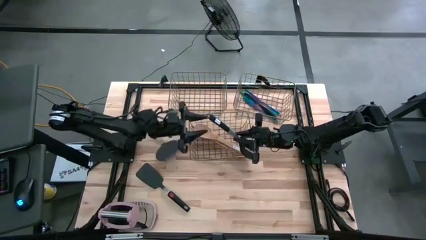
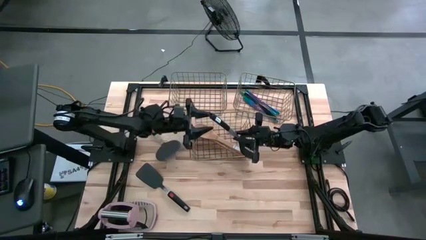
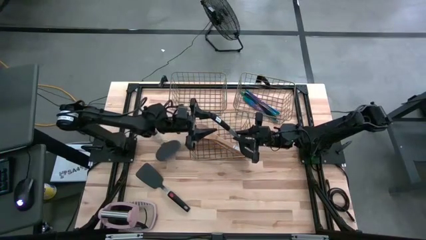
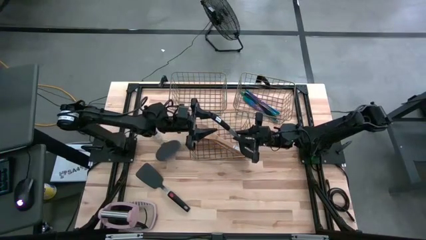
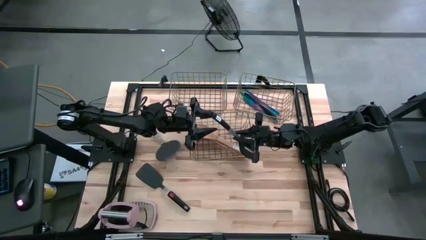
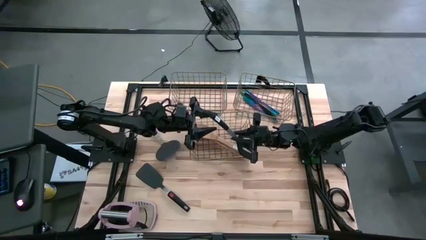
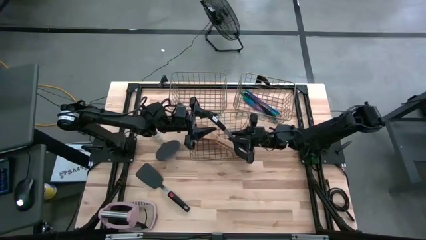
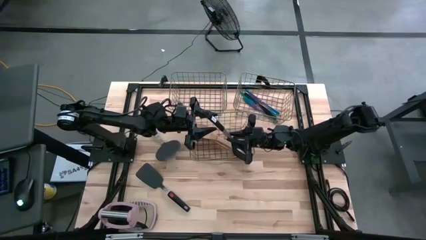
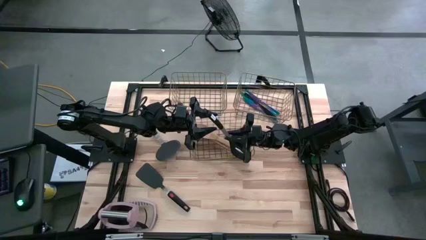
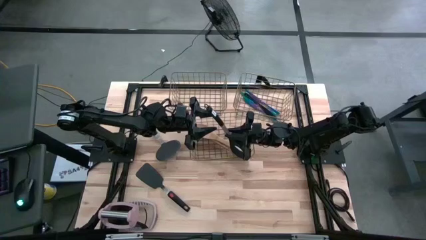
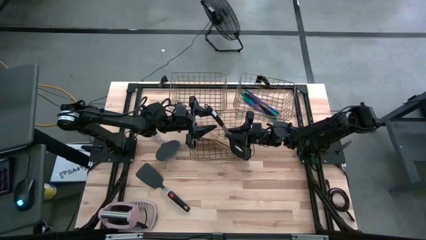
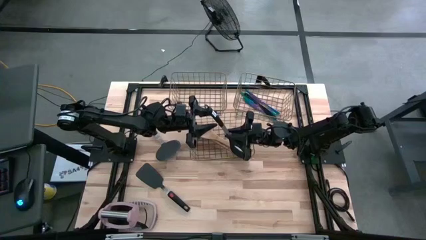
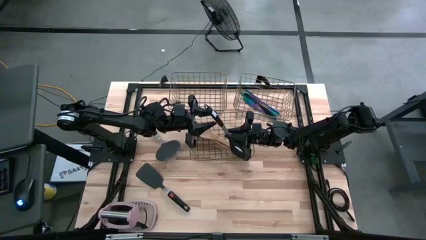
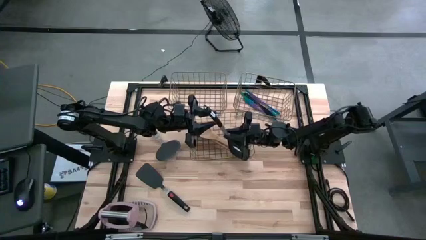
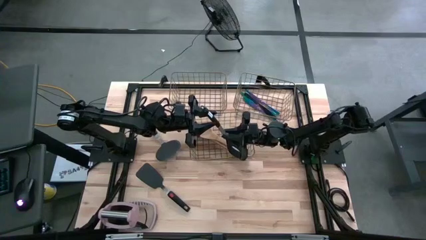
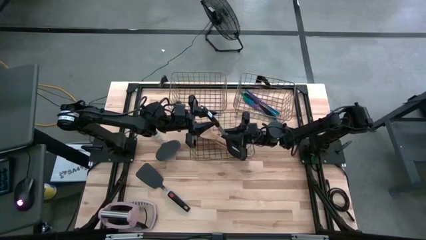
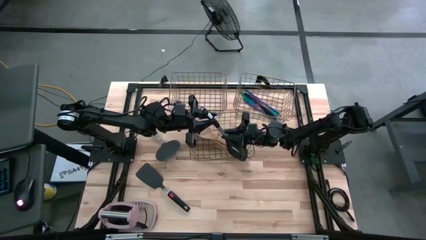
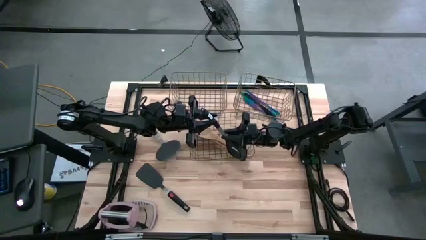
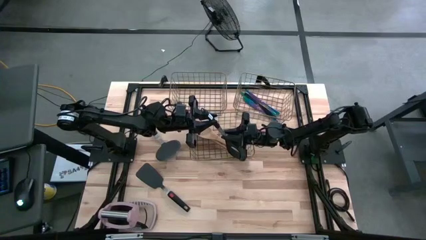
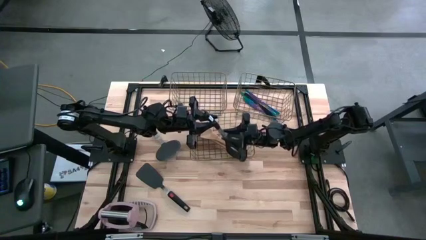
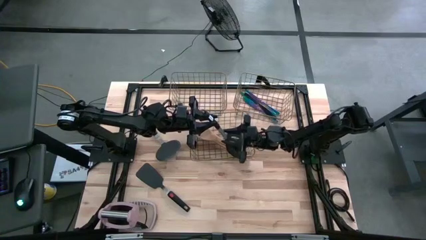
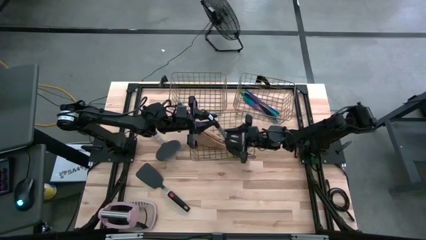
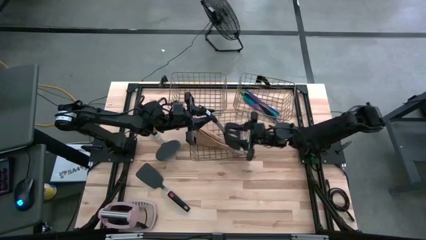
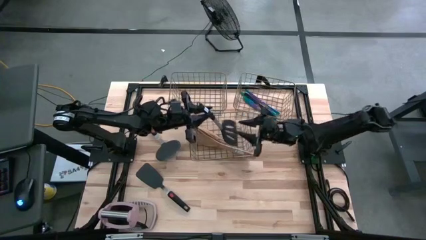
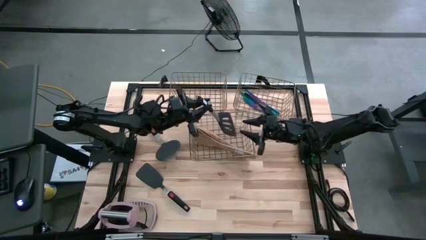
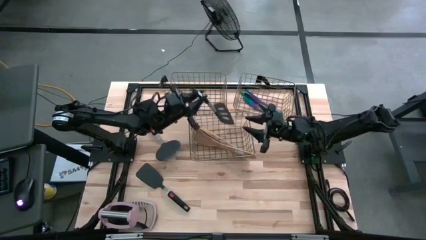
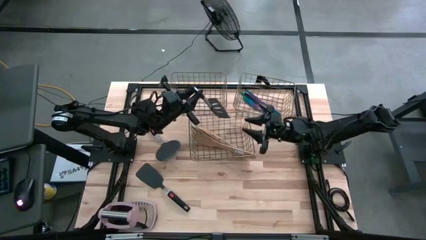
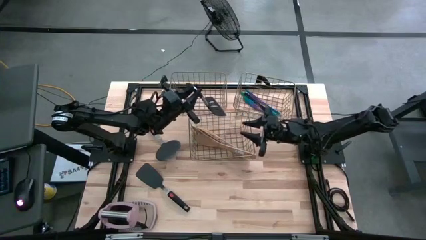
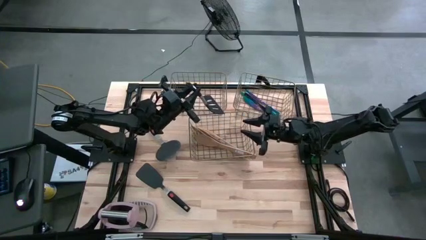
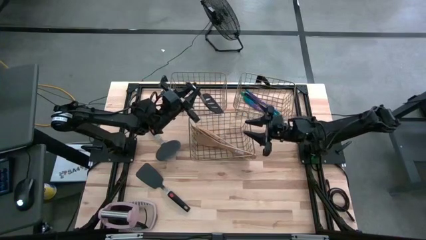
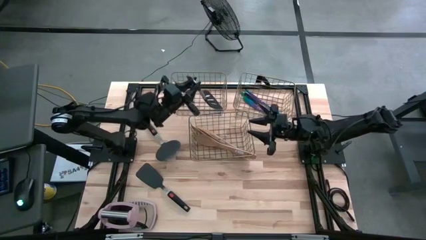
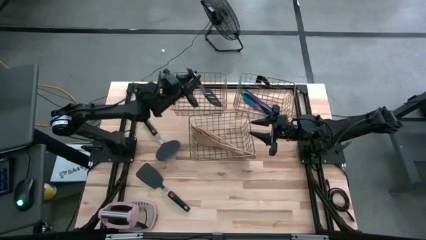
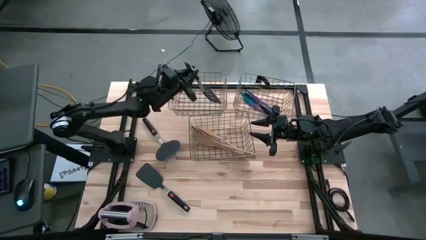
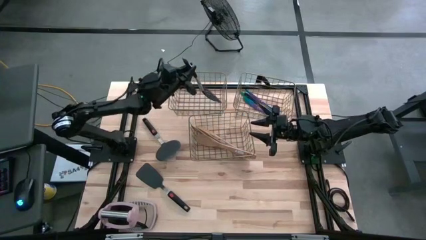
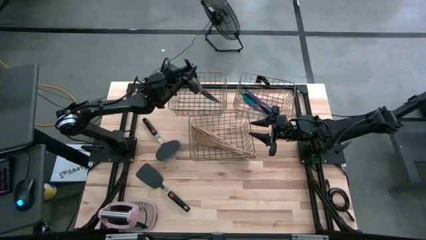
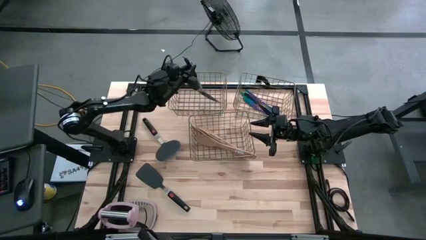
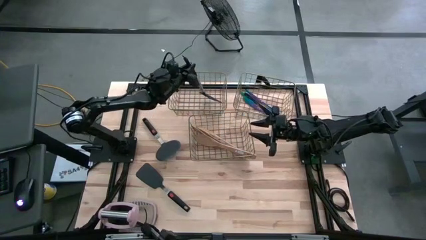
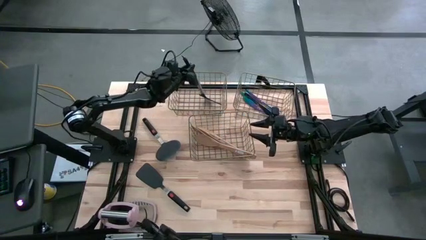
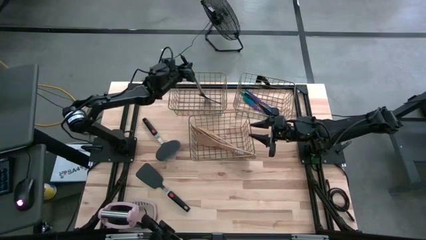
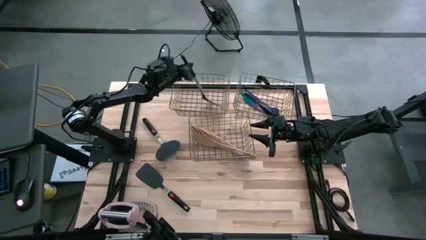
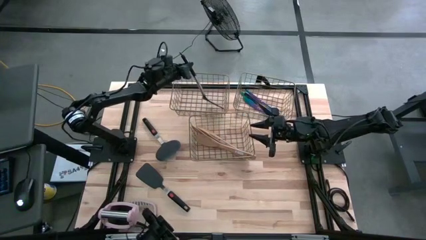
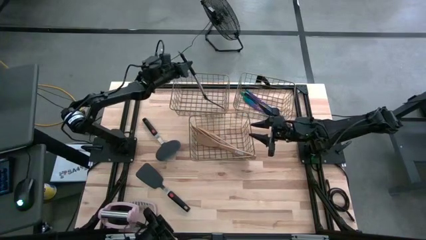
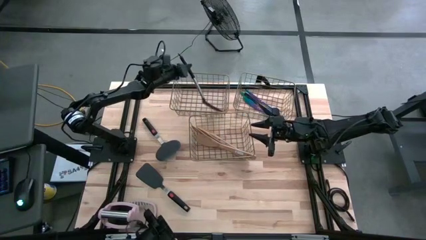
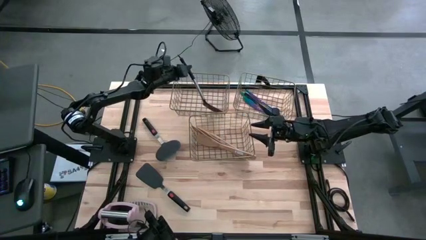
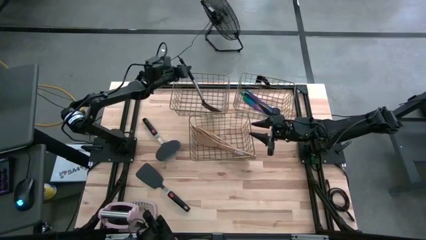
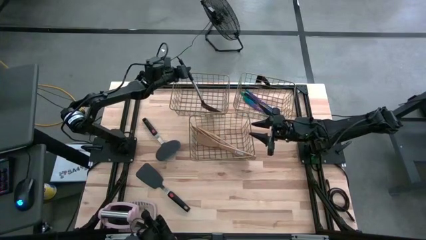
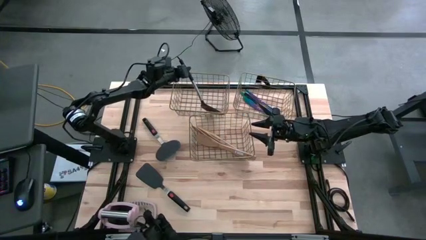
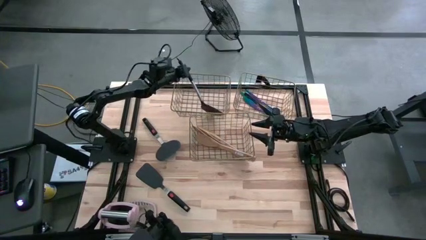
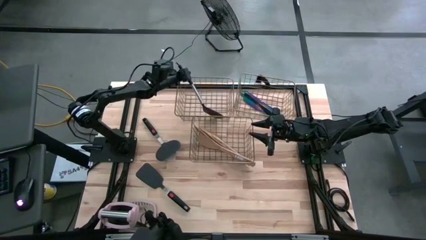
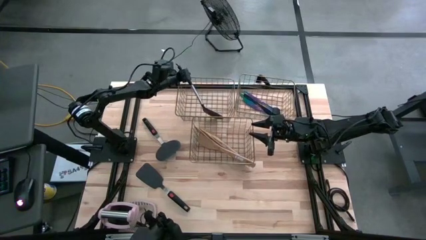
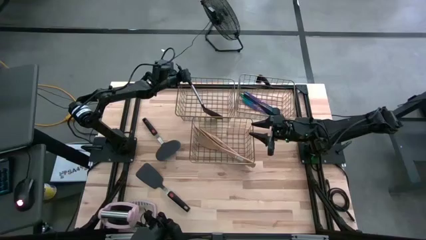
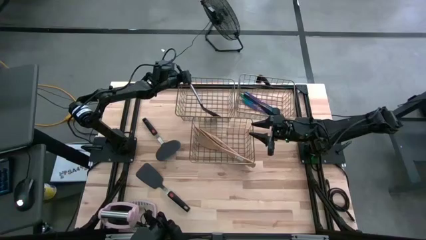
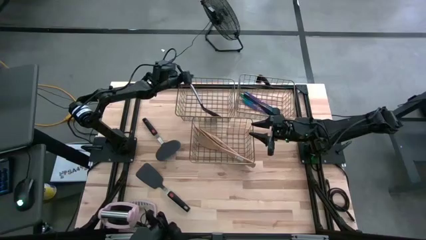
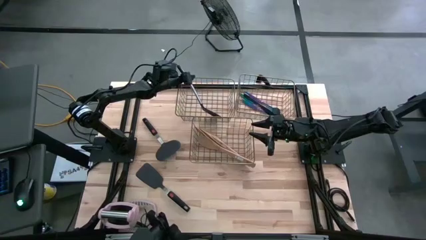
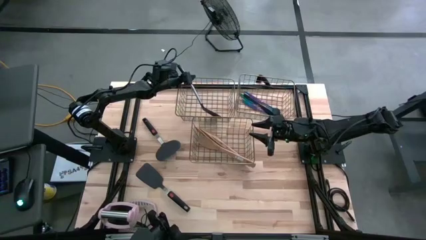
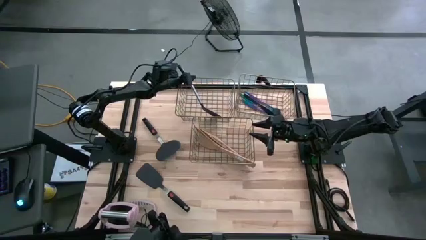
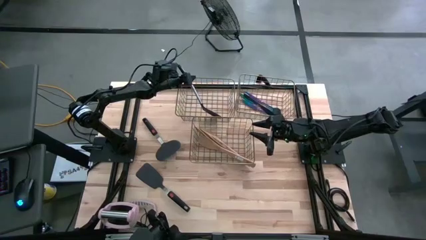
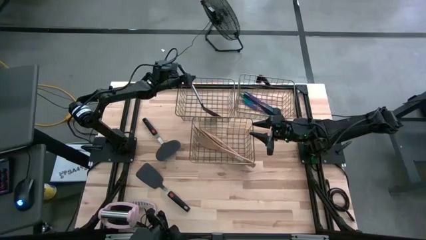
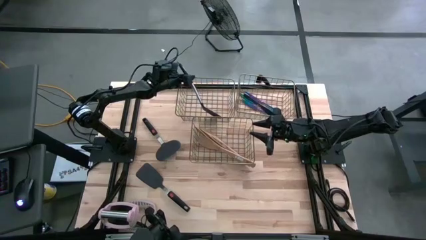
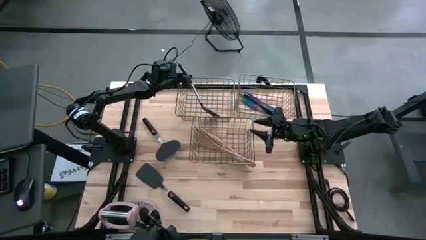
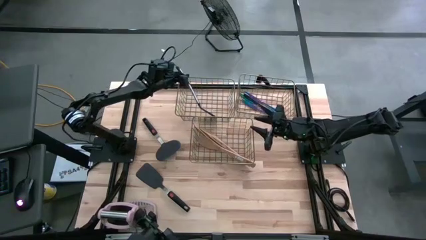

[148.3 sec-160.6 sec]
Task: Pick & Place Kitchen Items
Put the black slotted spatula into the top left wire basket

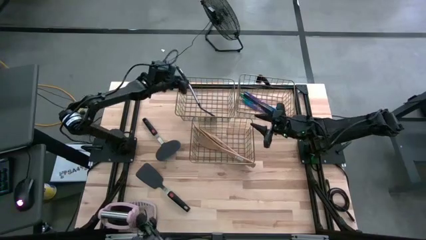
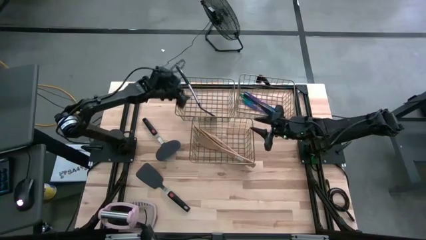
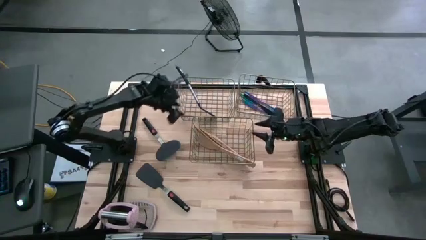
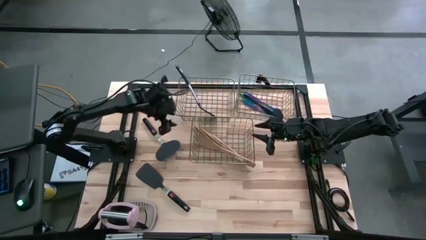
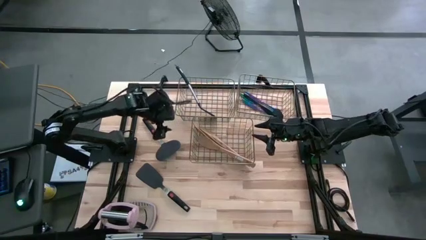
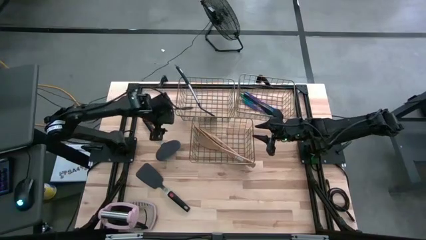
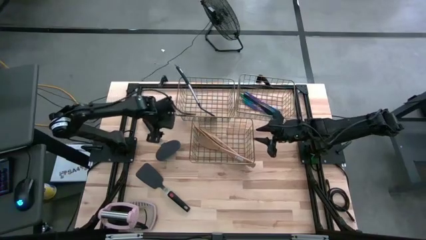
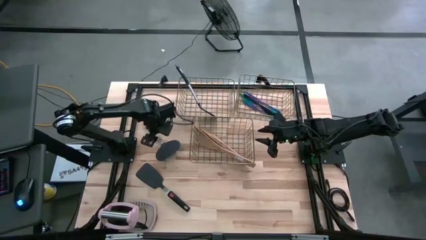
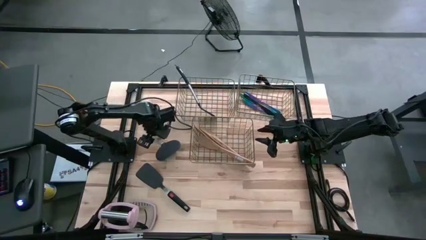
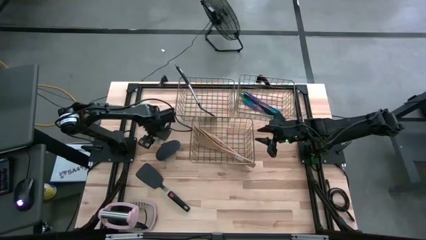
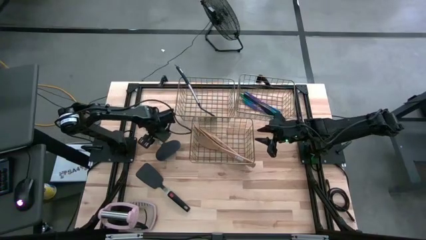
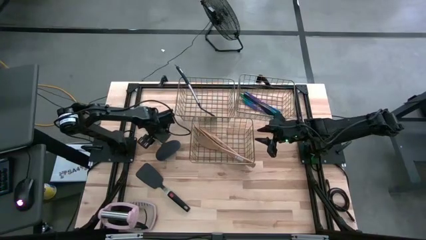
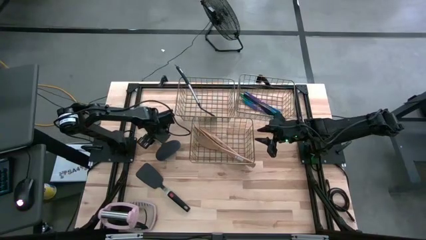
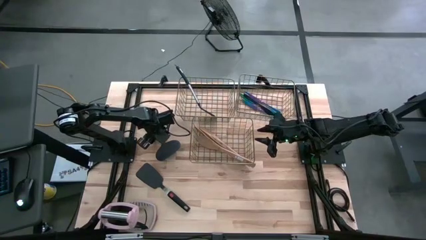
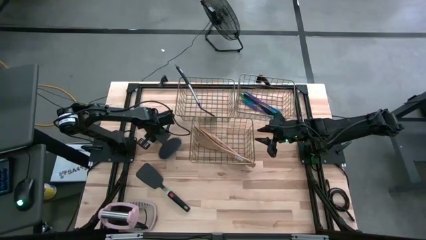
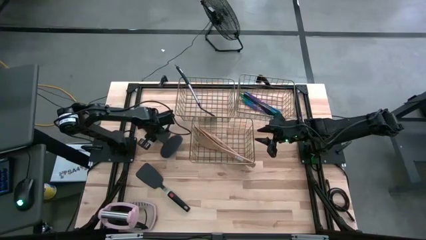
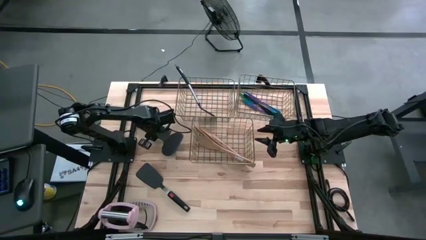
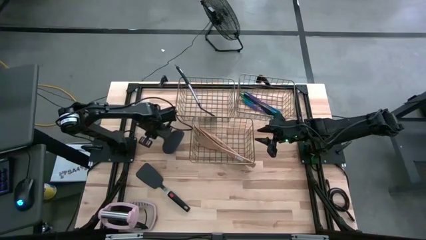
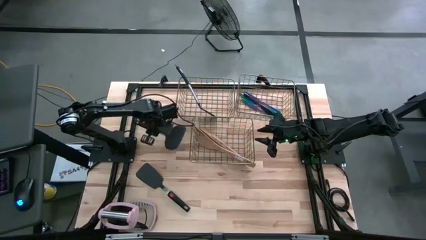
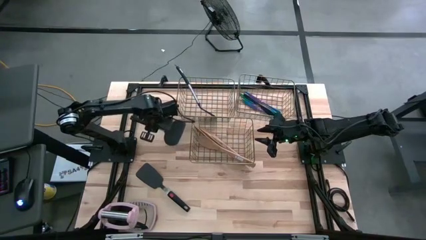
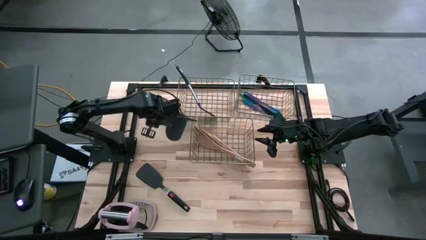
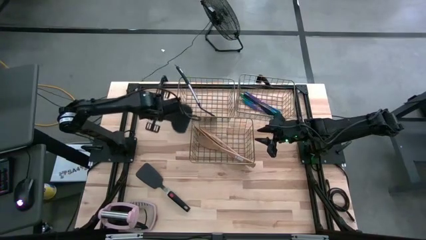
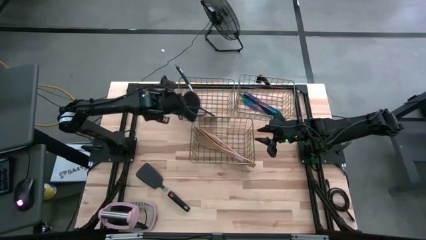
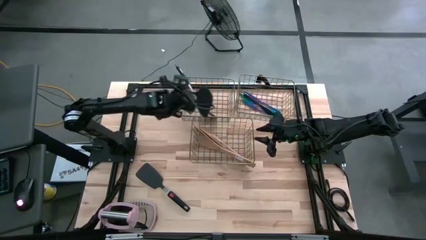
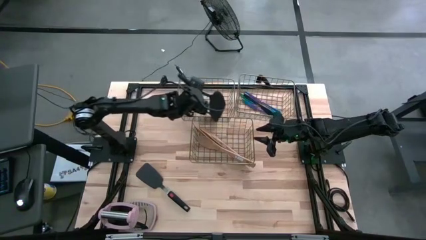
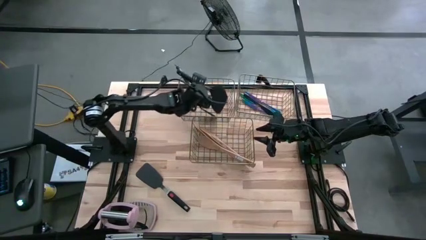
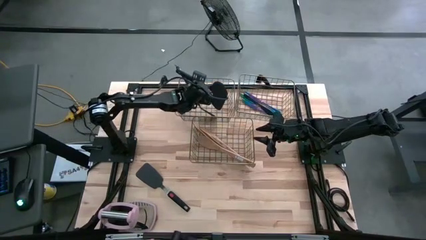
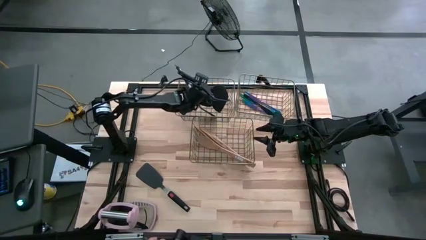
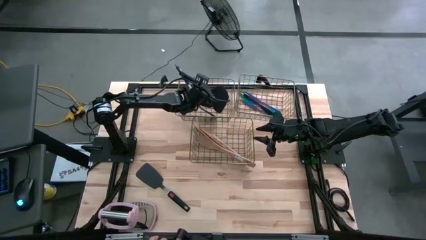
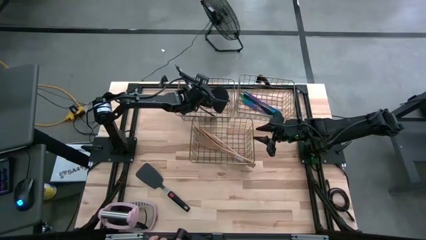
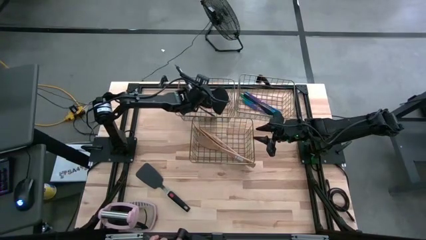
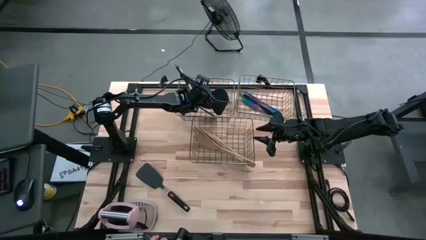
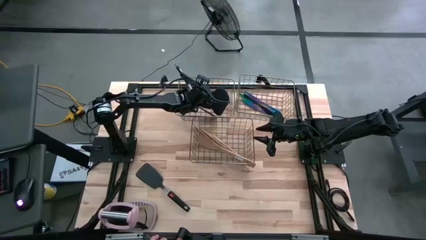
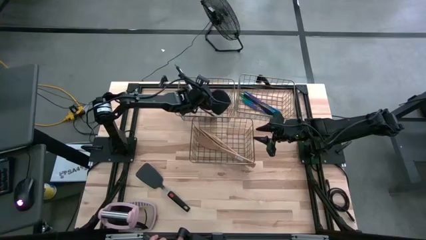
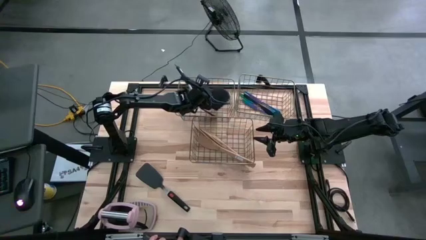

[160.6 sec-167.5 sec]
Put the black spatula into the top left wire basket
